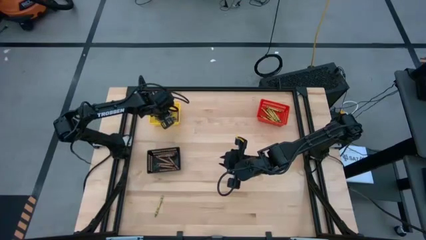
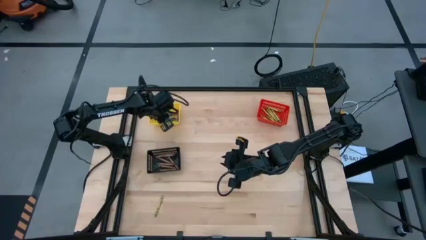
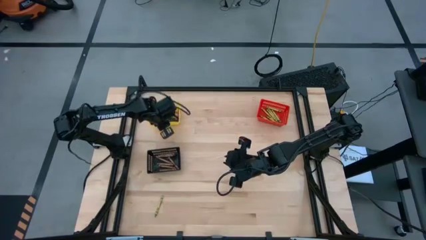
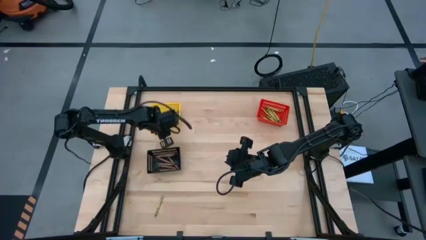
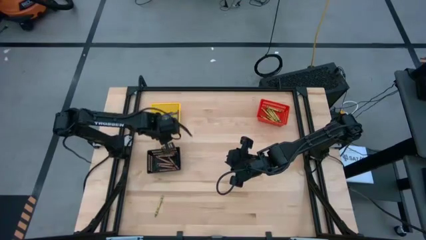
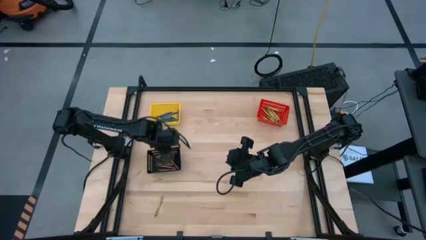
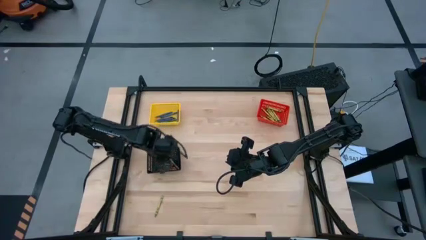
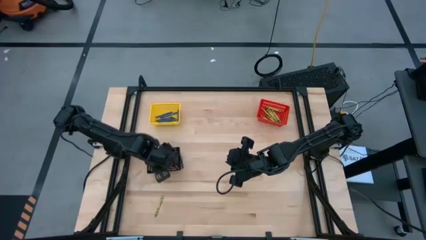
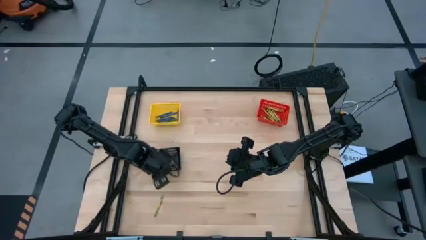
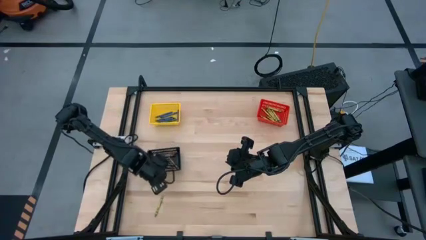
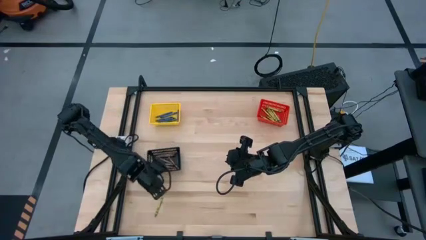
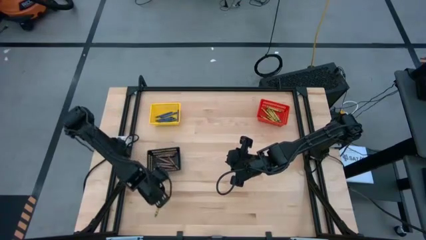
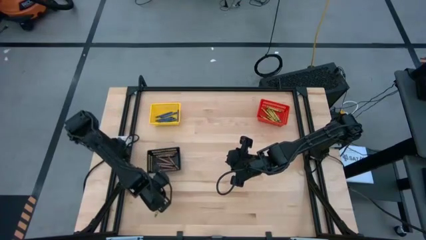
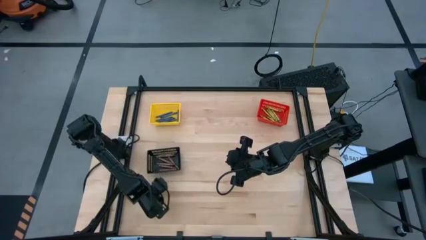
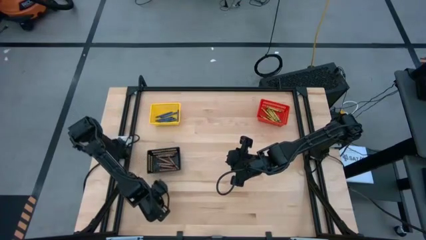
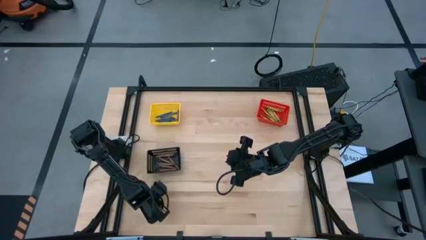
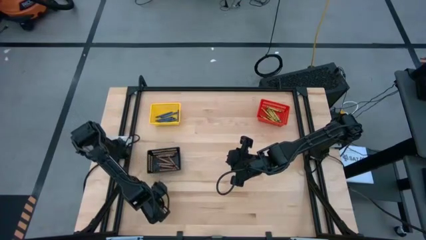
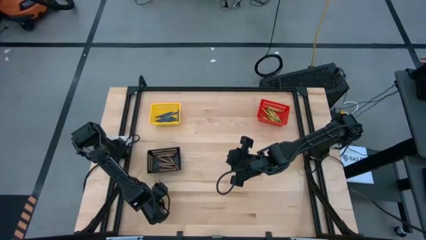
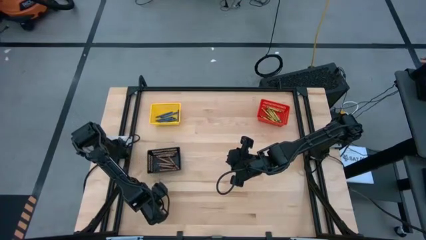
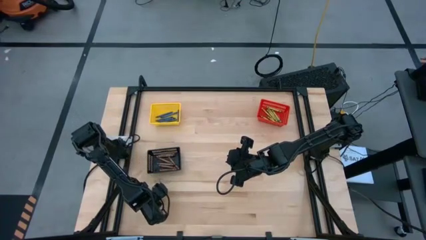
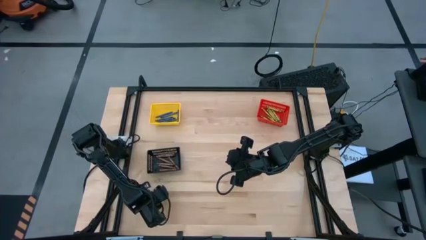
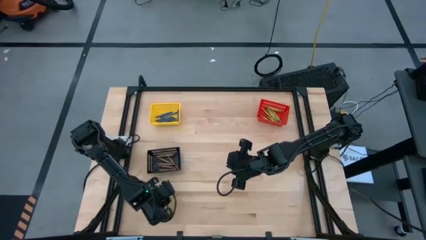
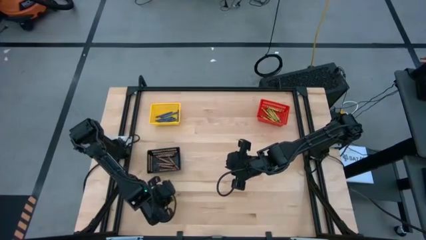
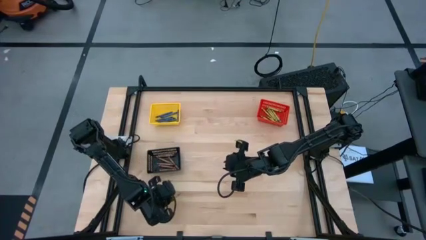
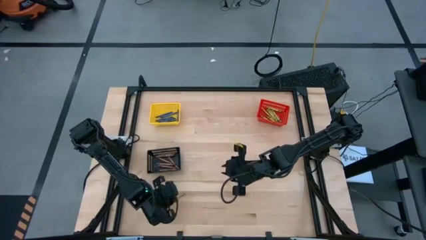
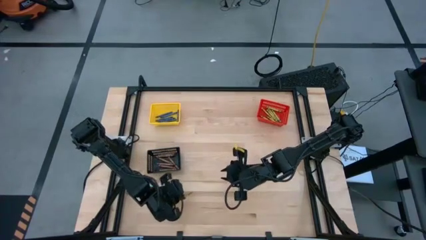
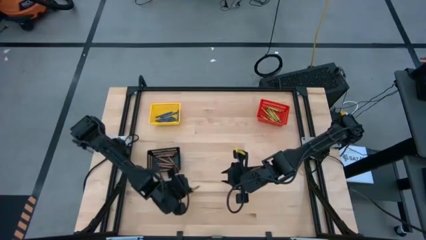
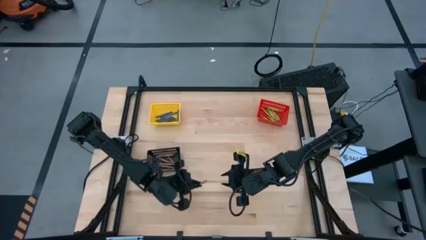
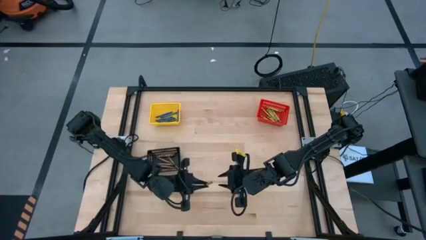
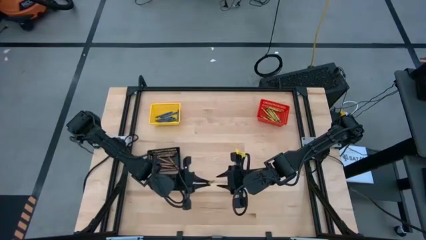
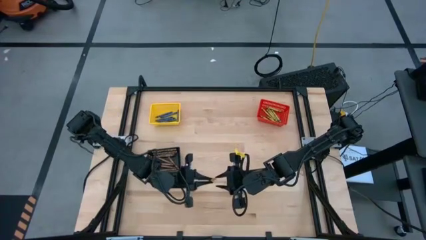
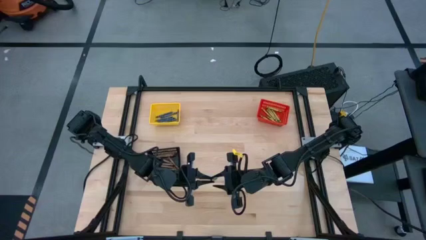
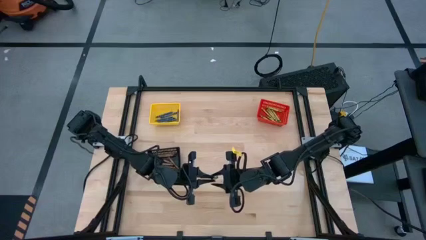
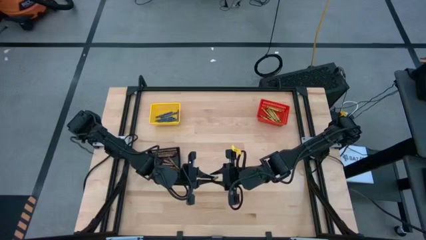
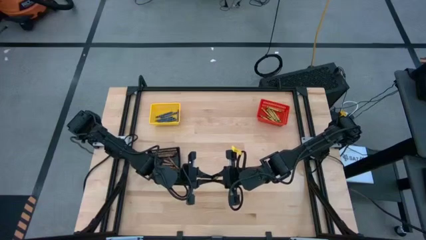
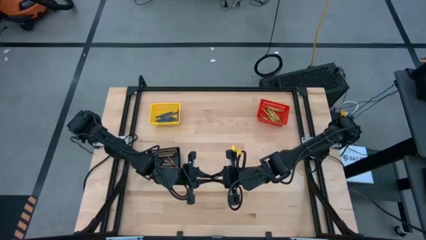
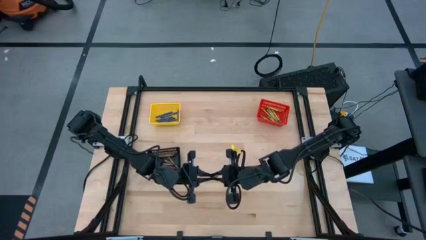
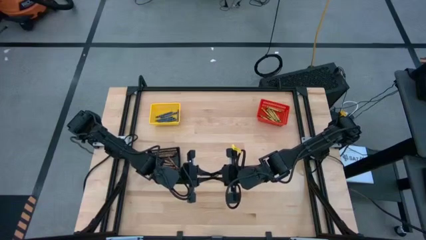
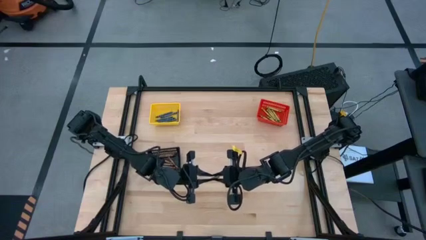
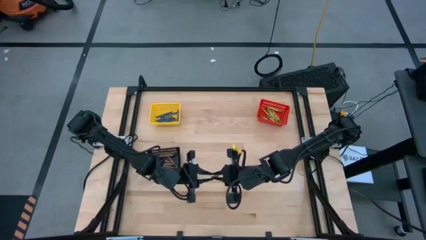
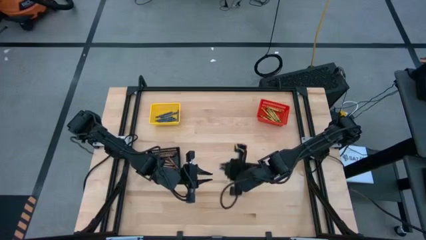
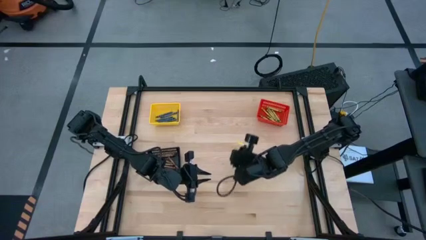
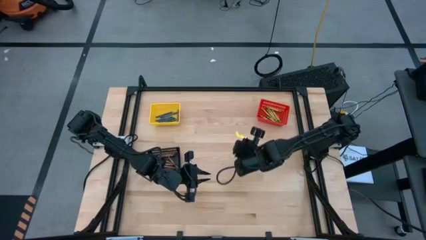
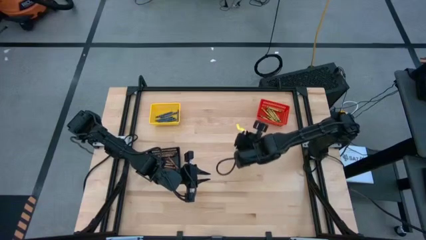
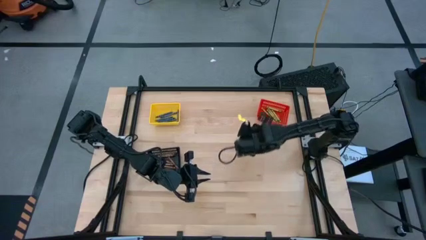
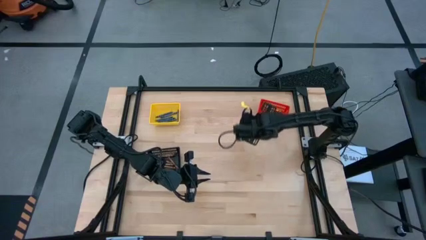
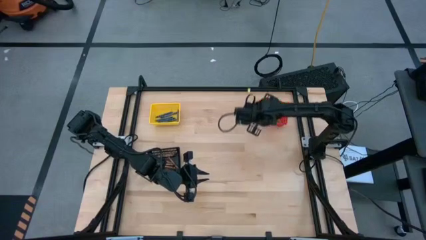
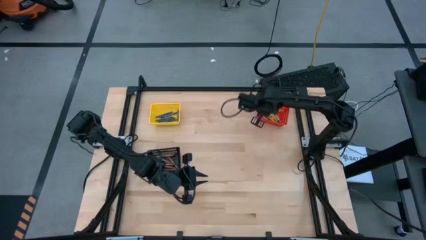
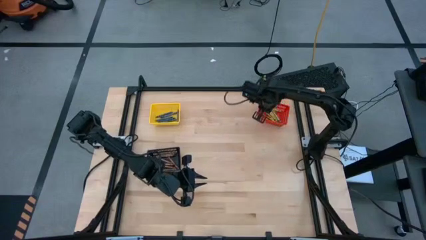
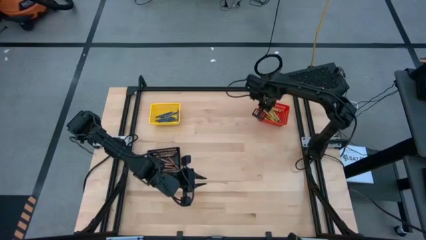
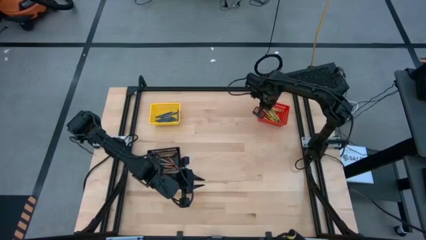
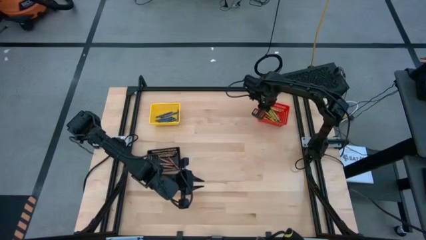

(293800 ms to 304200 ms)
Task: Sort crayons
Put the green crayon into the red bin
